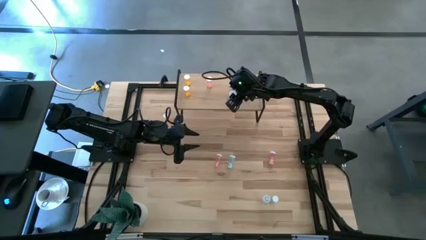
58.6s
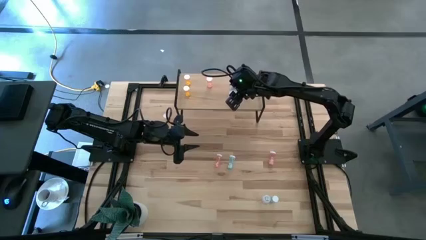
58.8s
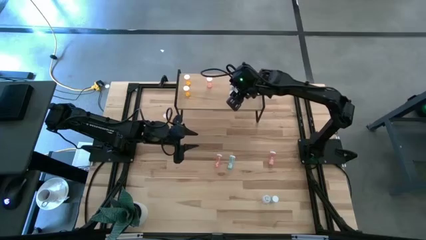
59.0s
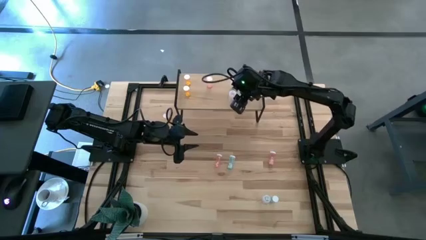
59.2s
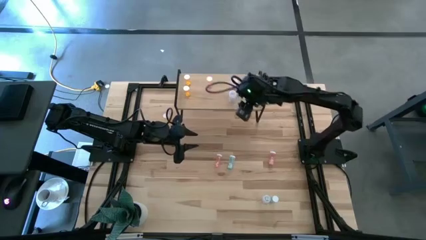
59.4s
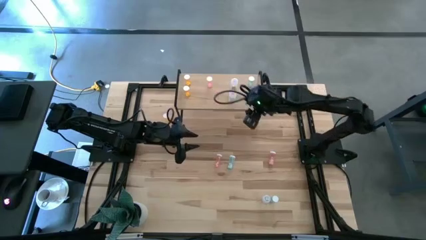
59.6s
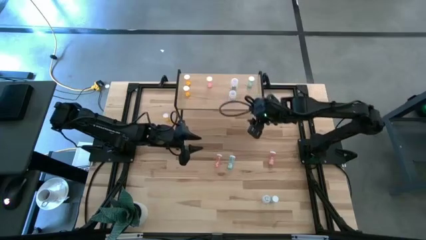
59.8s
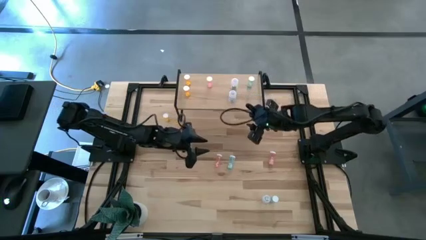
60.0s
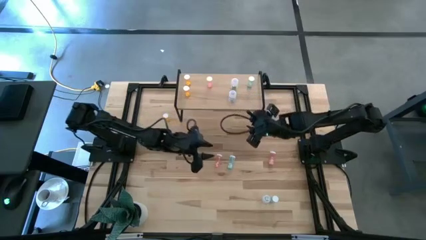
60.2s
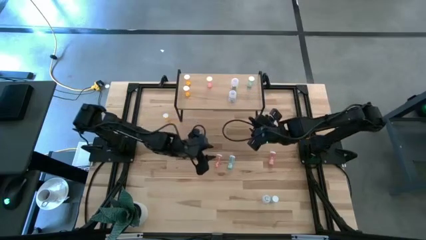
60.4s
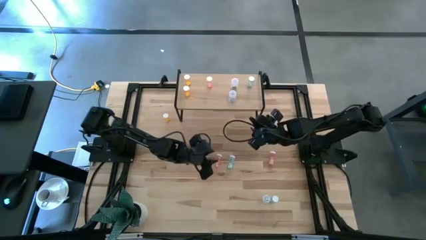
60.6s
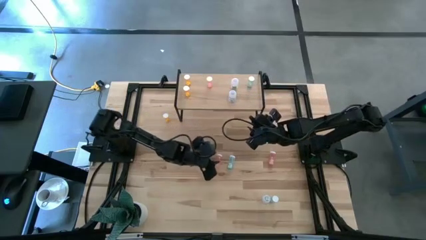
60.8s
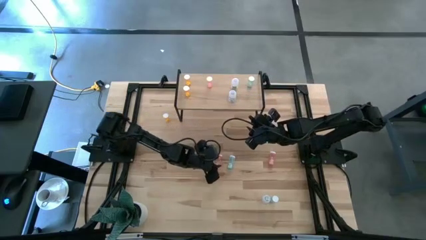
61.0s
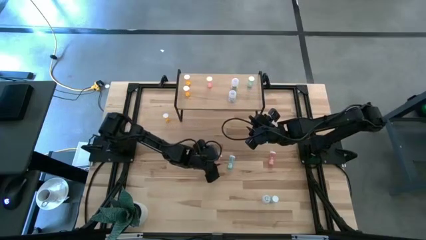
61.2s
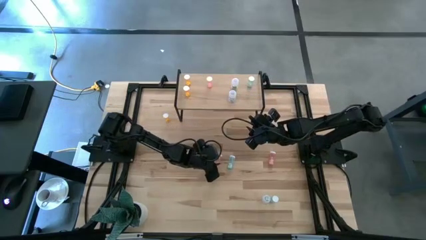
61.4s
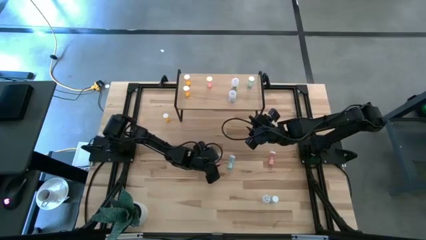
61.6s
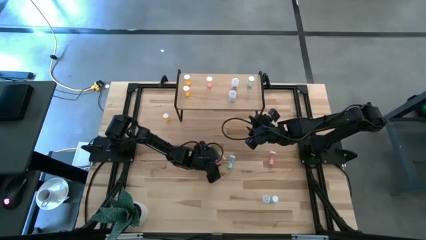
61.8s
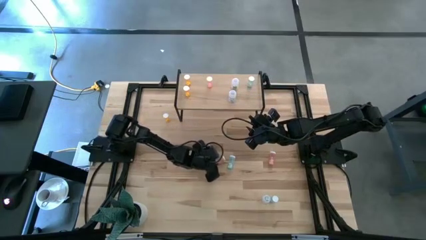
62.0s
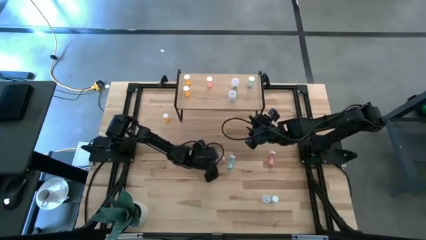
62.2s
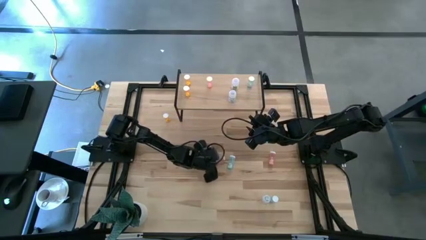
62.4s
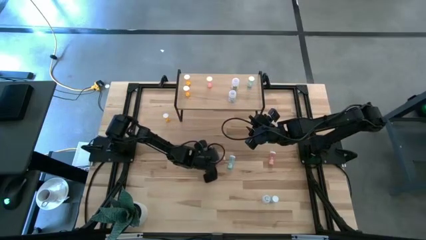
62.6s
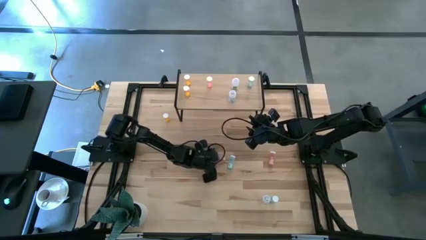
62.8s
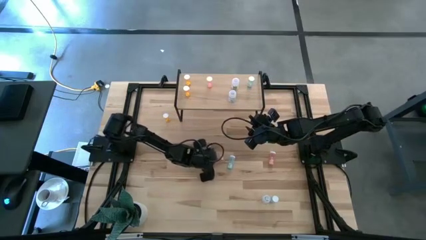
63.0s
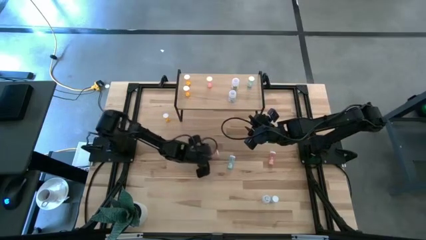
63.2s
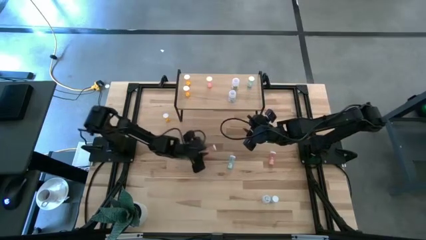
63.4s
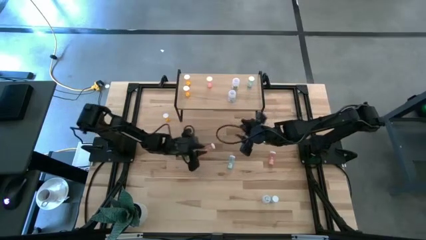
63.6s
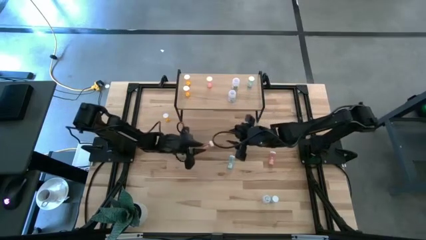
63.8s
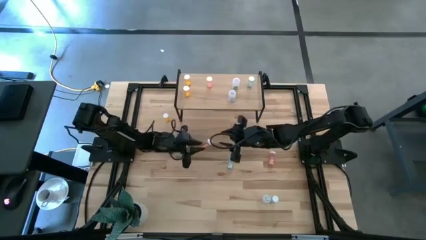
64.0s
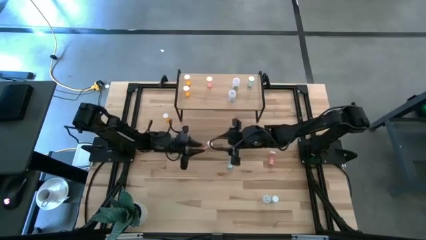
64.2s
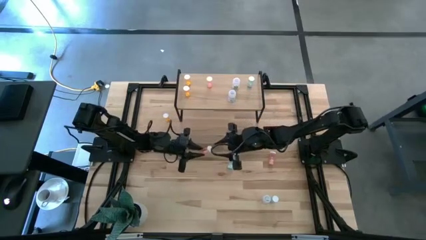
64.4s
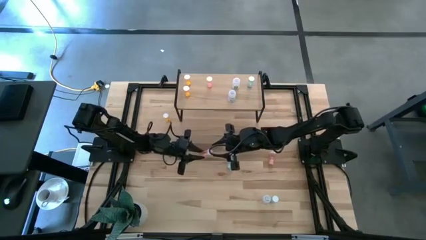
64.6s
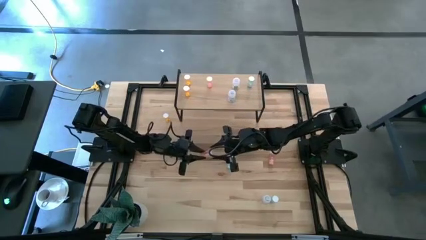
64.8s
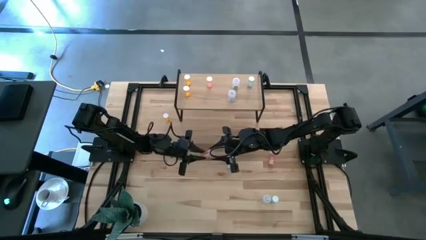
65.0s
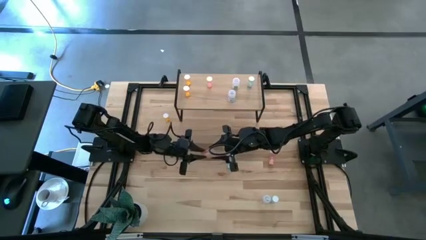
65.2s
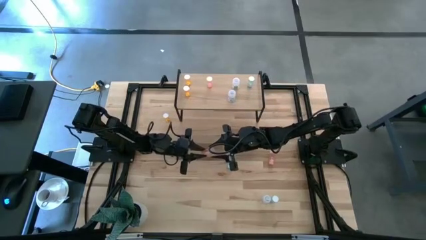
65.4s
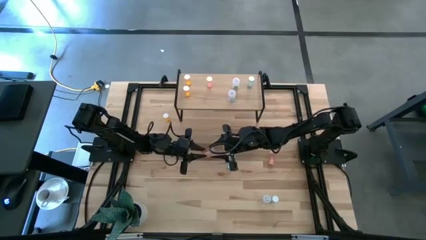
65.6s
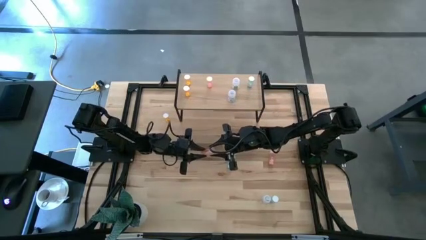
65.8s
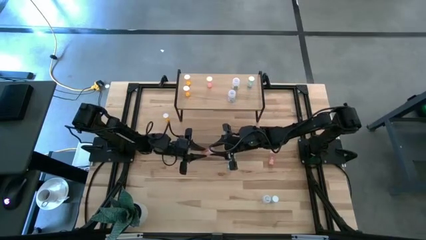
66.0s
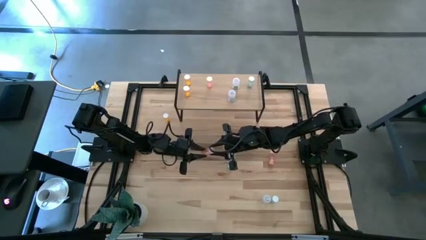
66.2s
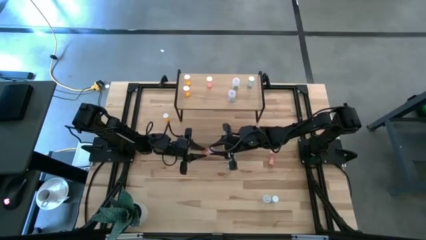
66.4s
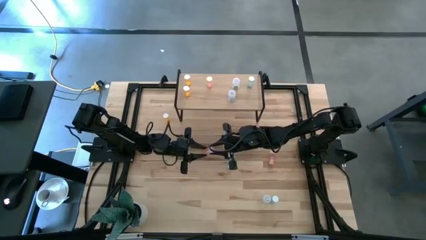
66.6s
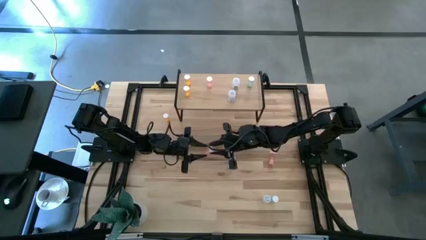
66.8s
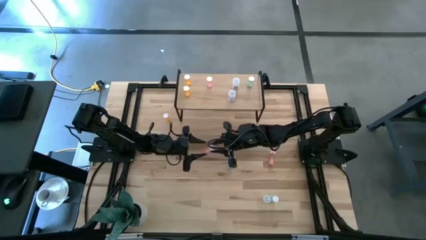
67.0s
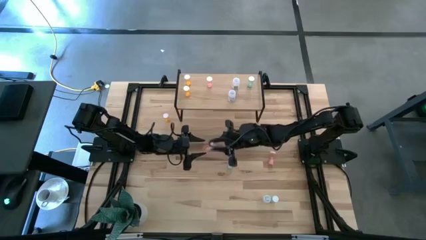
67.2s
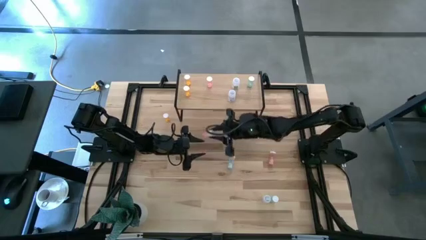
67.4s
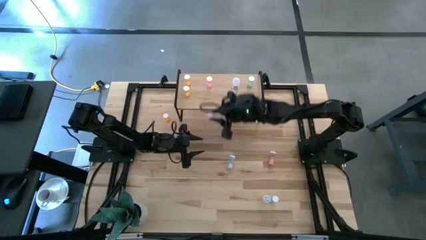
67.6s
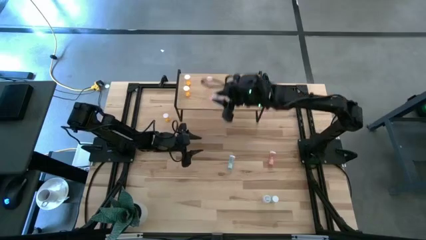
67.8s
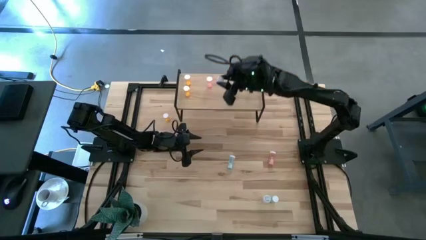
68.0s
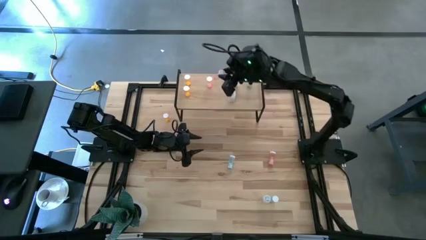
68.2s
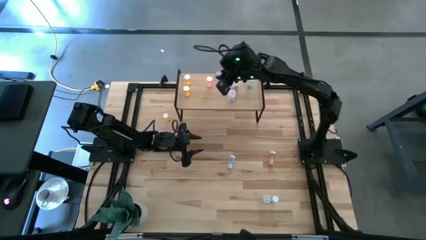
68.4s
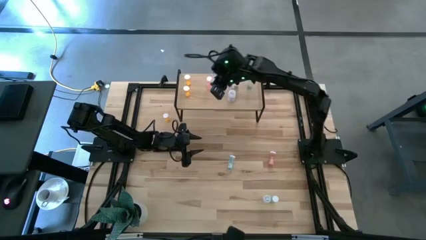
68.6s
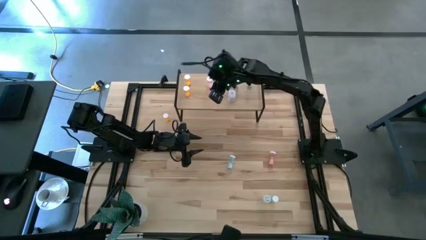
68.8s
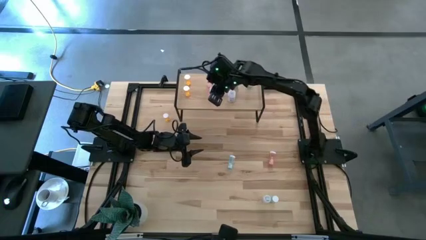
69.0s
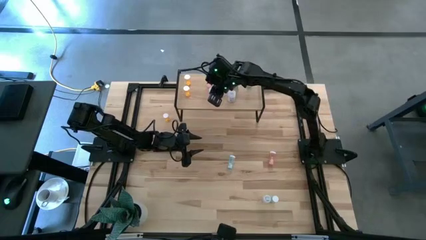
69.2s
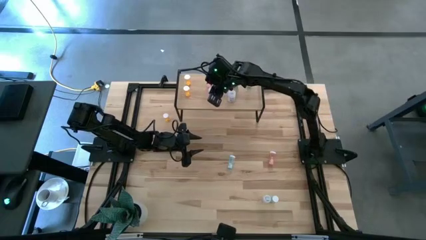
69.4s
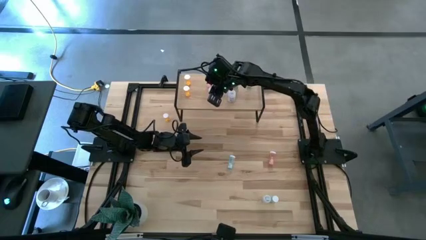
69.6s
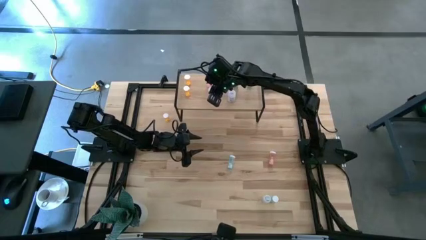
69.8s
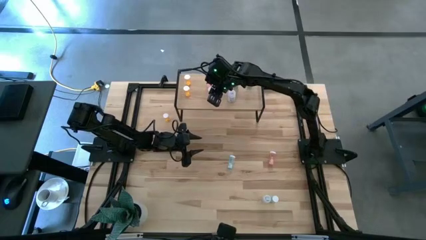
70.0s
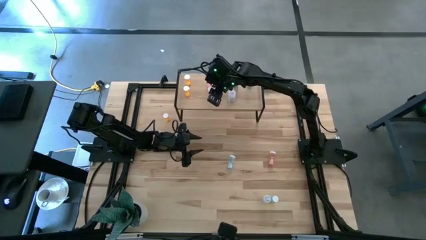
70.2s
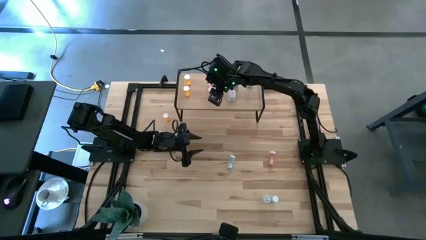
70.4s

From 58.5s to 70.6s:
Task: Pick and place medicine bottles onto shelf by color
Align the left pink pill bottle with the other pink pill bottle on the shelf

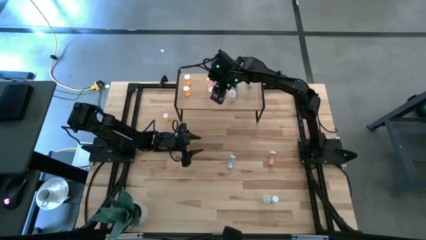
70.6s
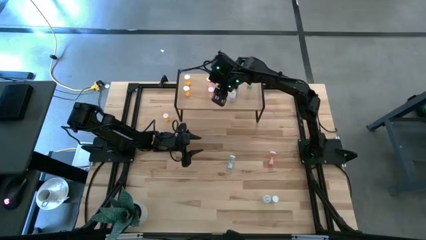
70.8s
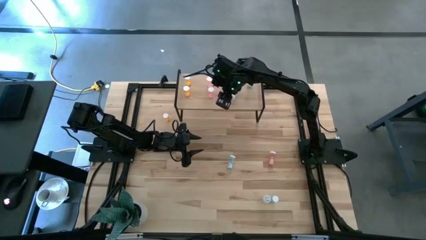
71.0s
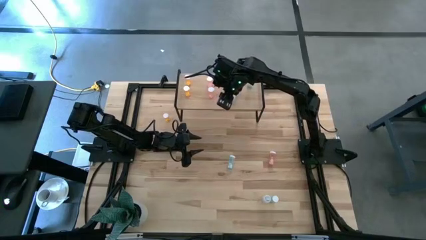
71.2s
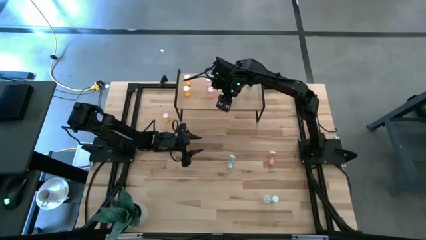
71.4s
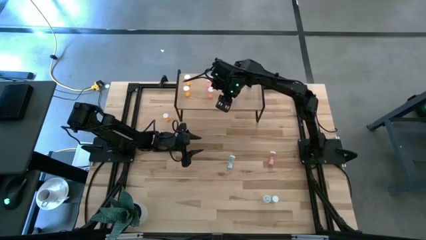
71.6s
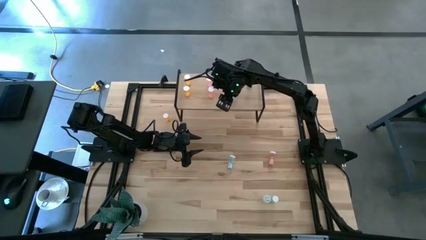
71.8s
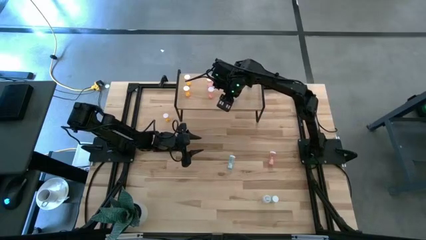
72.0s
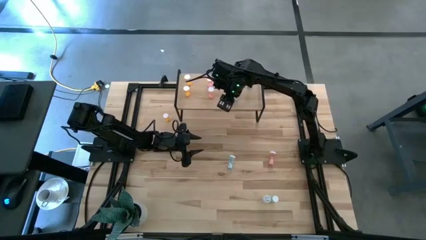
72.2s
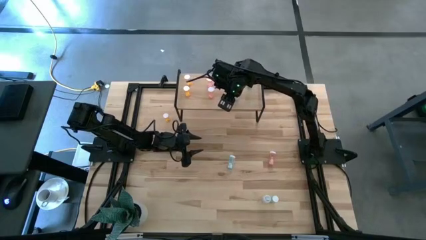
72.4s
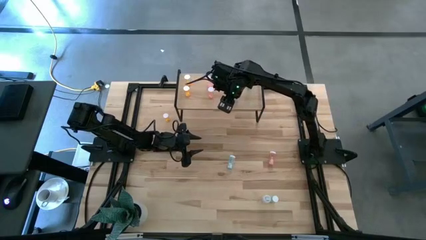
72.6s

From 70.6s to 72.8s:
Adjust the white pill bottle

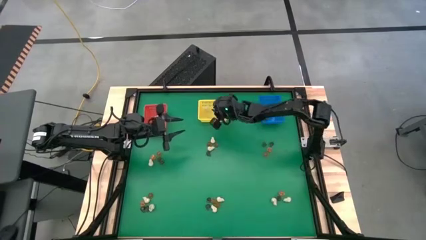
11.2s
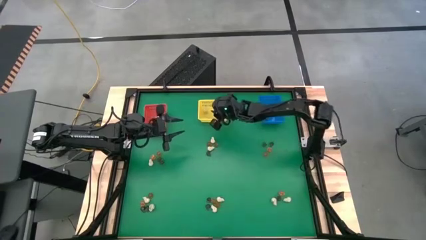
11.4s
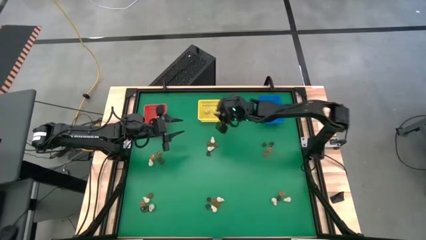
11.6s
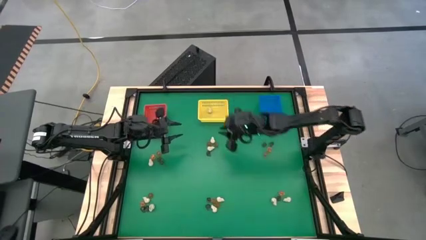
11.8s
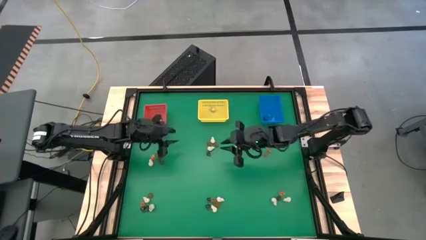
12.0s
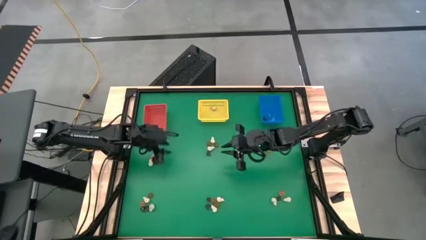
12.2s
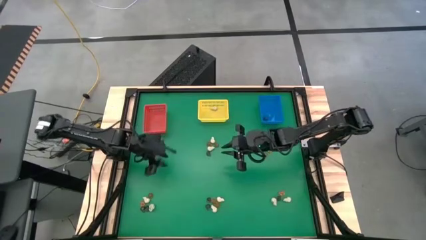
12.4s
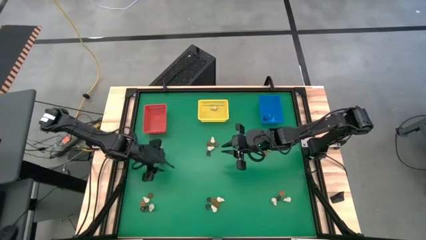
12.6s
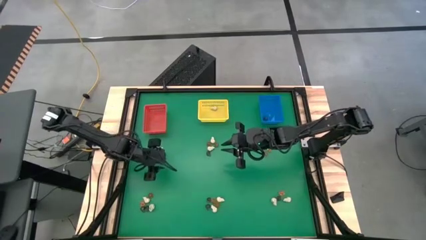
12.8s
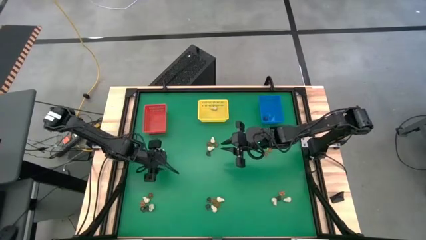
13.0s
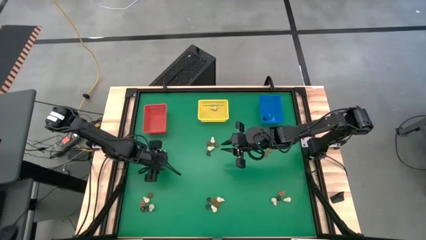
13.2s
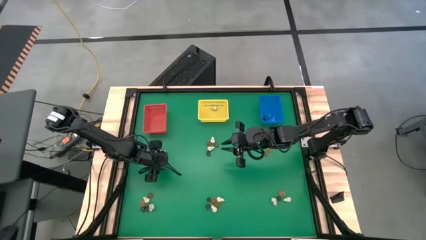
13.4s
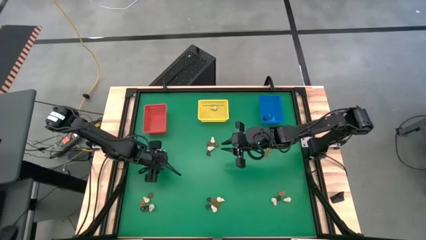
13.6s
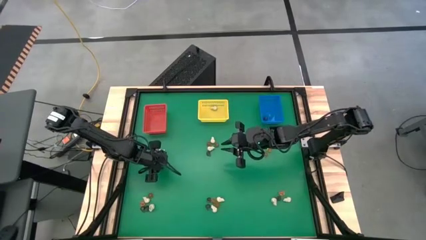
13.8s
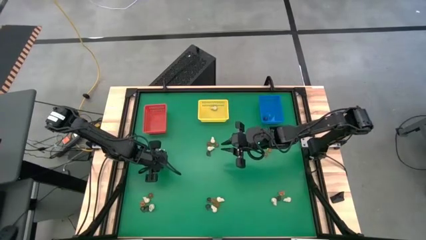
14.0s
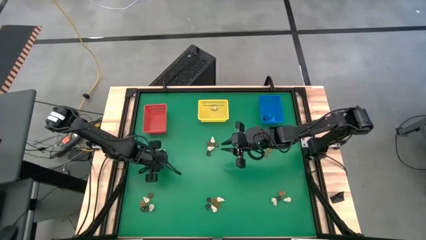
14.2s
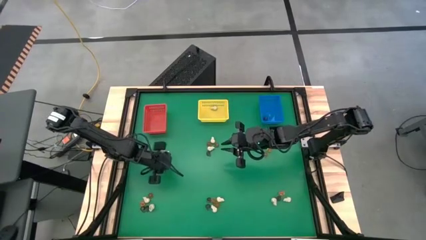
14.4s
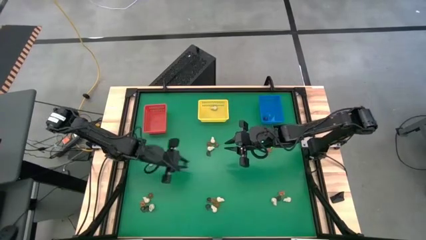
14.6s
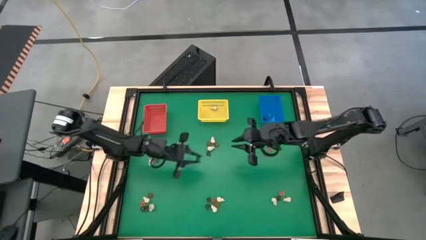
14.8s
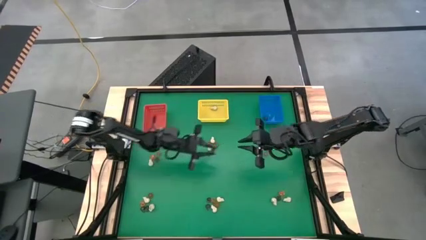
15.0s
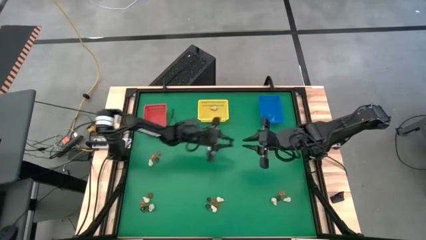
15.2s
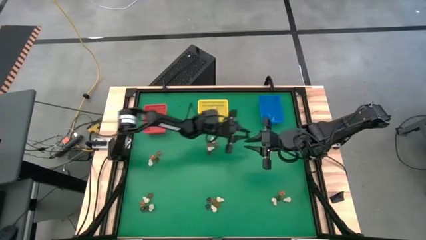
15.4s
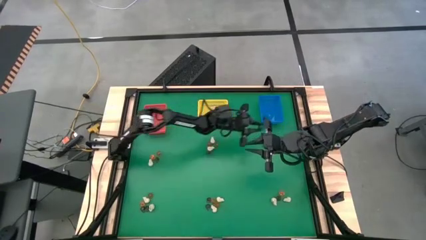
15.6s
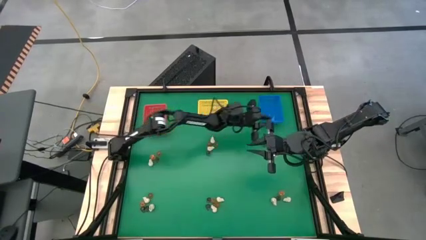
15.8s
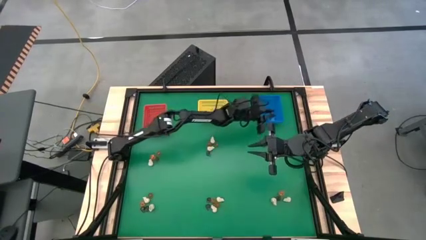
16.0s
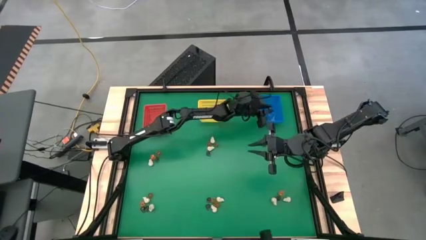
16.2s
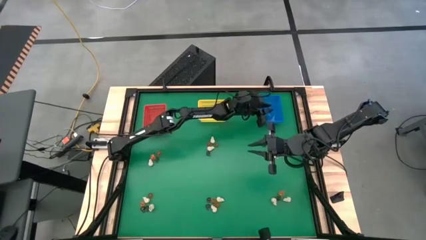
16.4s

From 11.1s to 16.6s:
Task: Sort Halloween decoration
Put the purple skull toy into the blue bin
